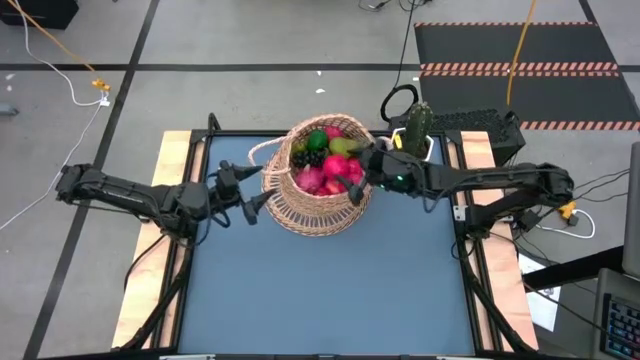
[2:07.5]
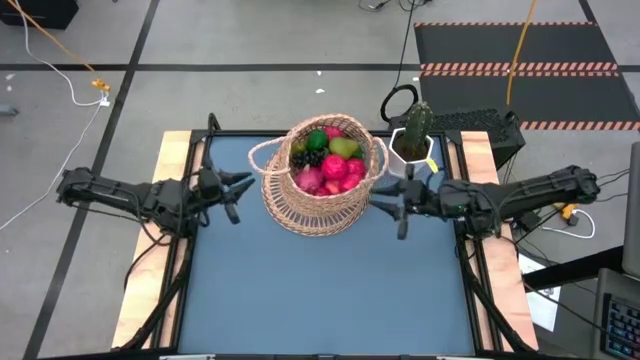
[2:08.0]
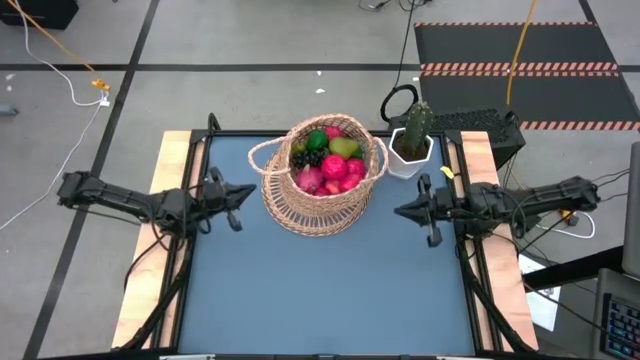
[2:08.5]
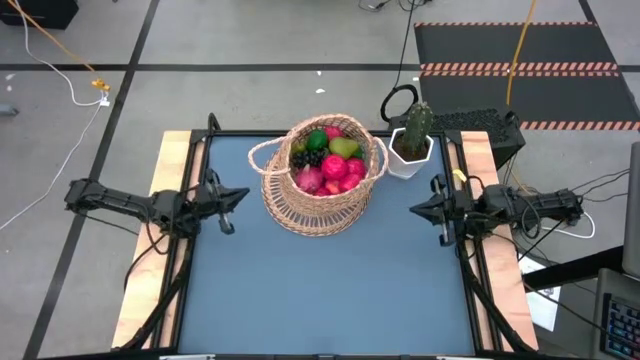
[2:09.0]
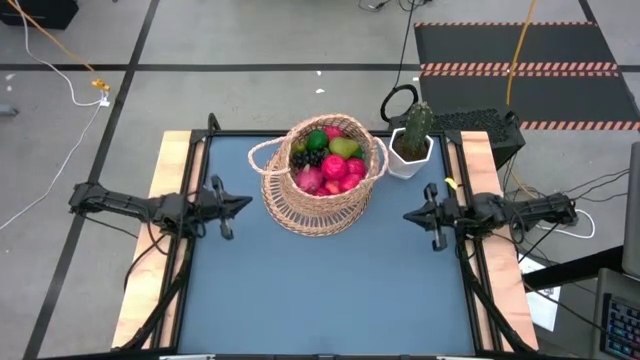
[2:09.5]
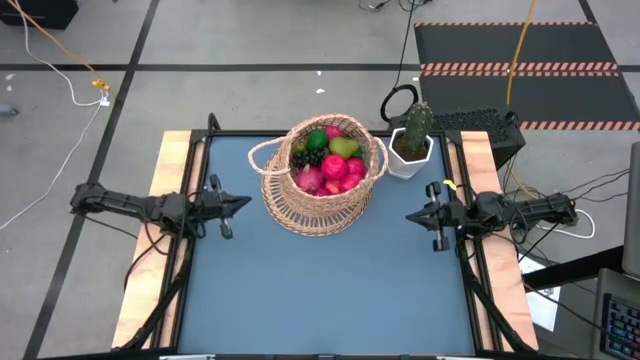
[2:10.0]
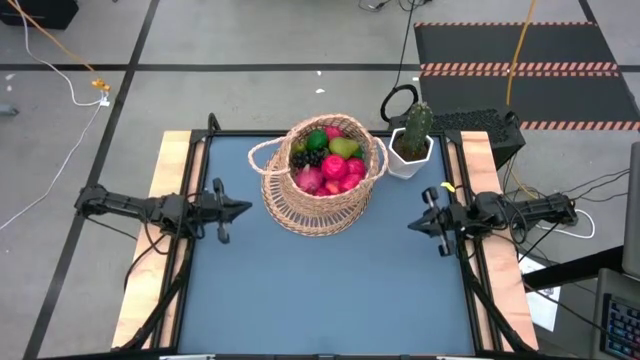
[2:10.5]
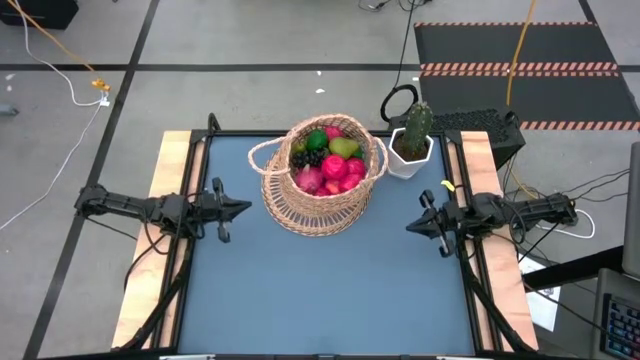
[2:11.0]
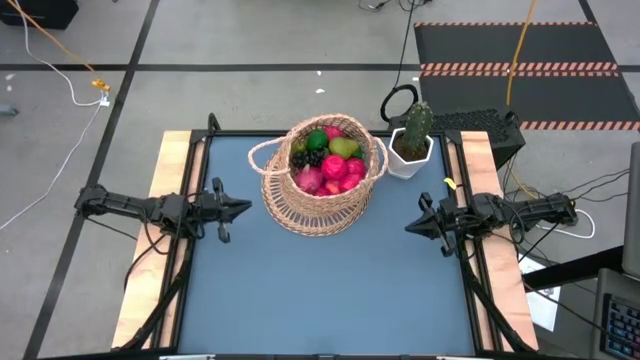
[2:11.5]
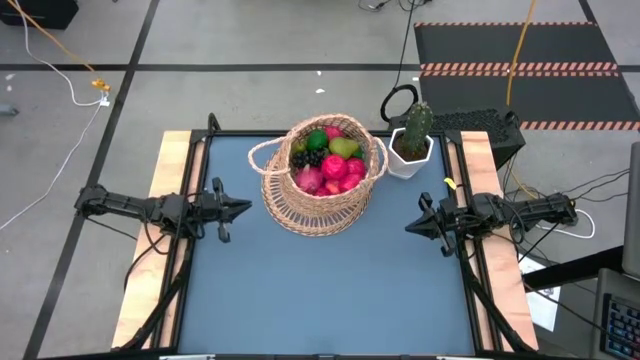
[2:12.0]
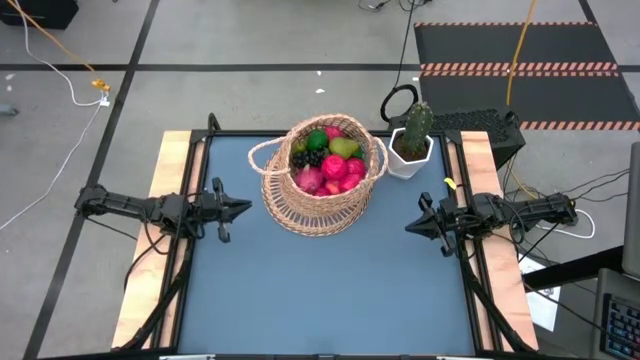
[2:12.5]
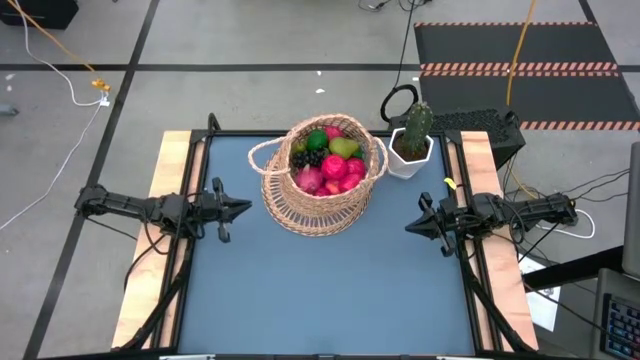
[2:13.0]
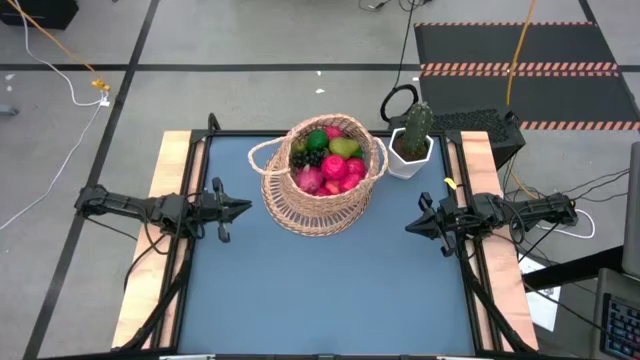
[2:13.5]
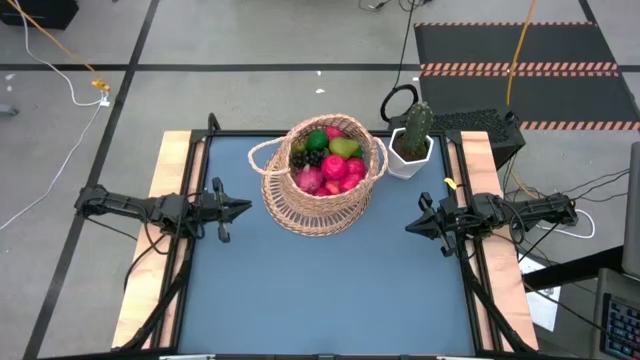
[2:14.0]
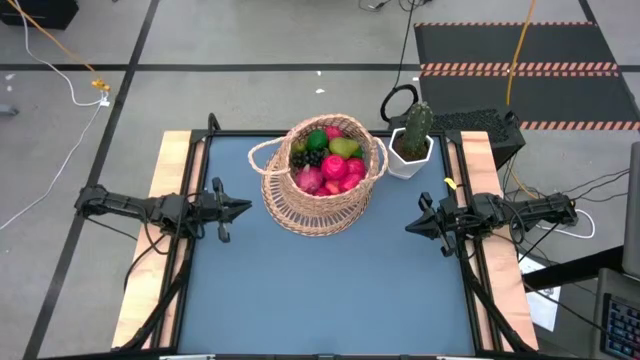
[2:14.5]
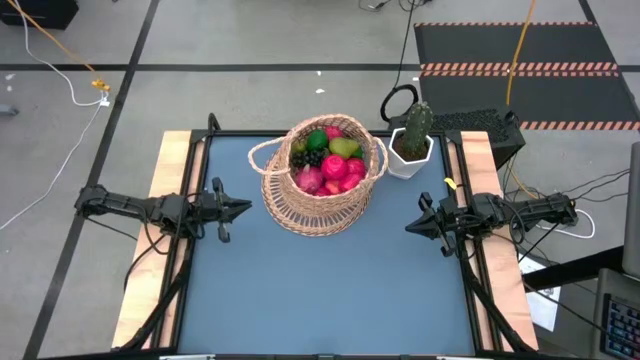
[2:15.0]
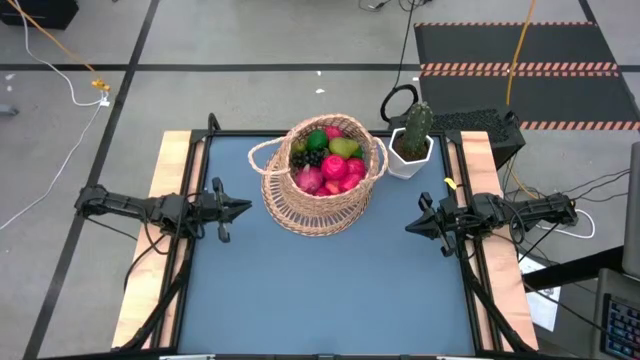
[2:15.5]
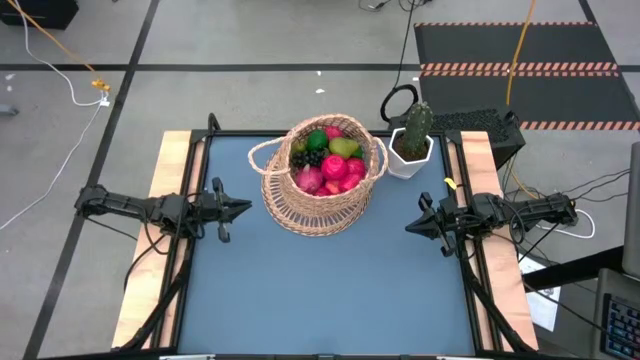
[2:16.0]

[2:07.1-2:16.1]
Task: Build produce basket
Return to Home Position

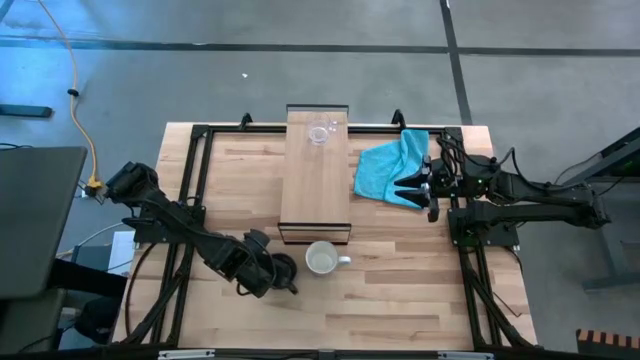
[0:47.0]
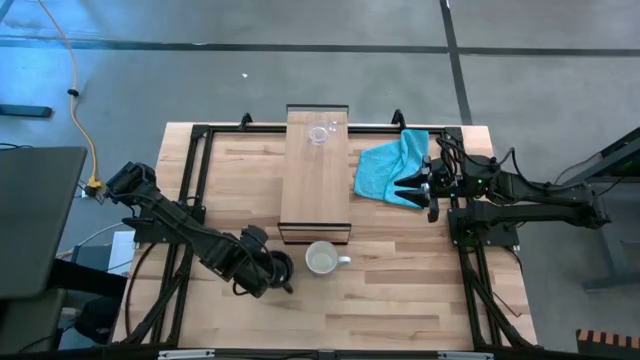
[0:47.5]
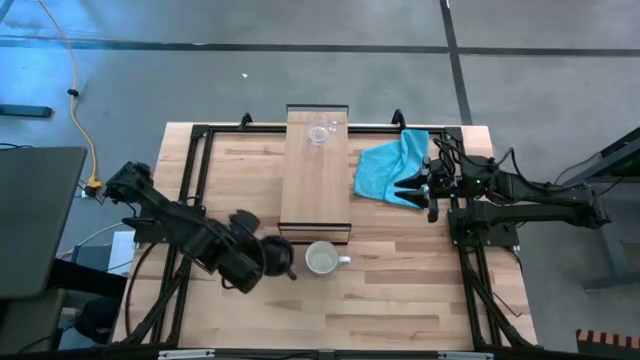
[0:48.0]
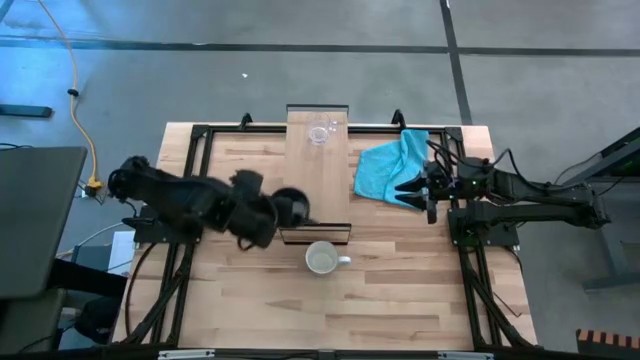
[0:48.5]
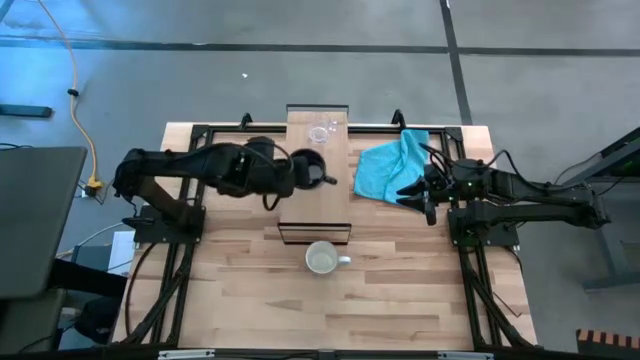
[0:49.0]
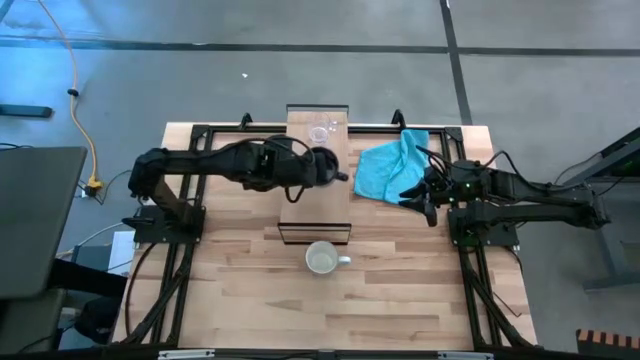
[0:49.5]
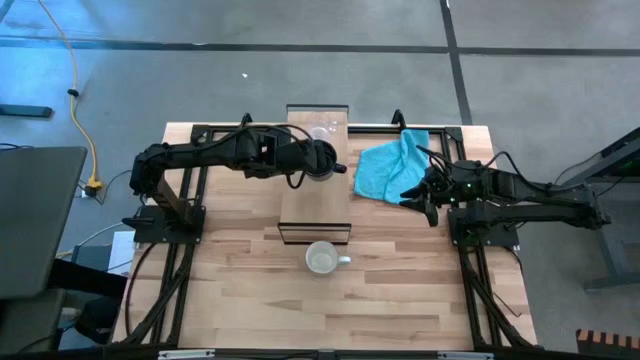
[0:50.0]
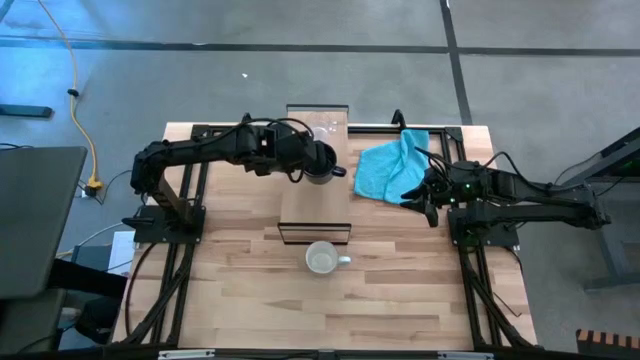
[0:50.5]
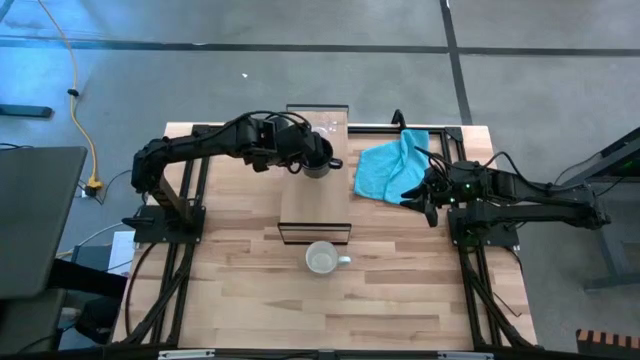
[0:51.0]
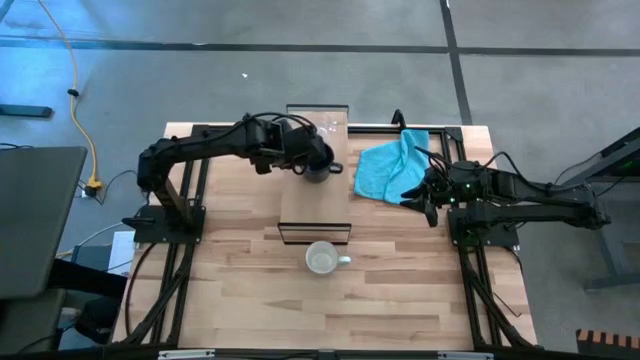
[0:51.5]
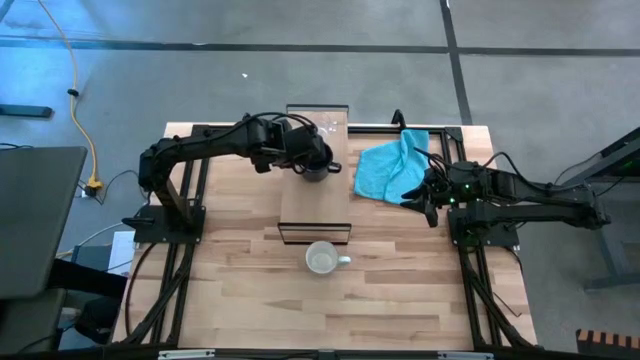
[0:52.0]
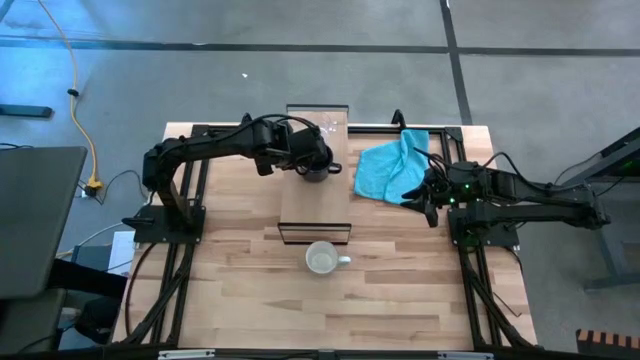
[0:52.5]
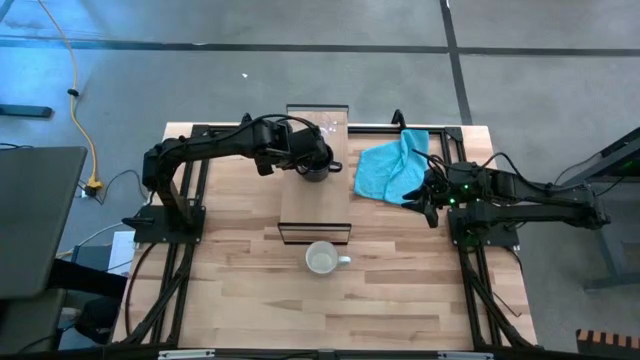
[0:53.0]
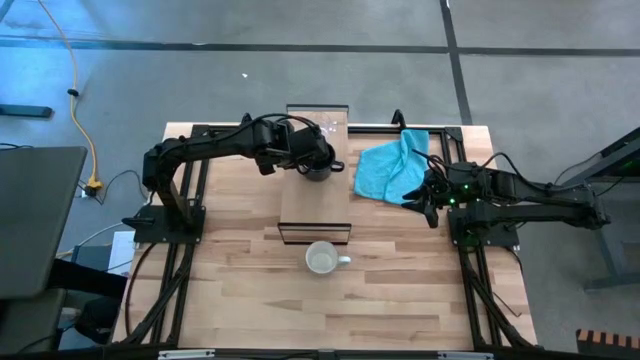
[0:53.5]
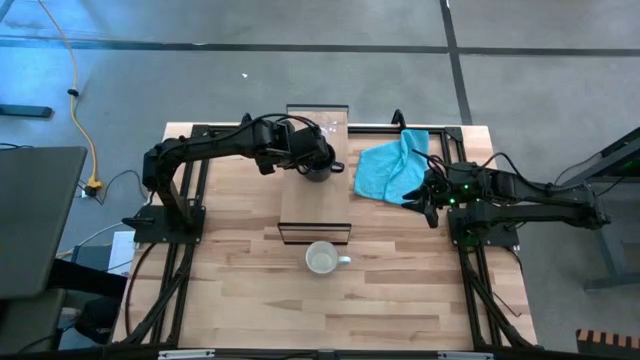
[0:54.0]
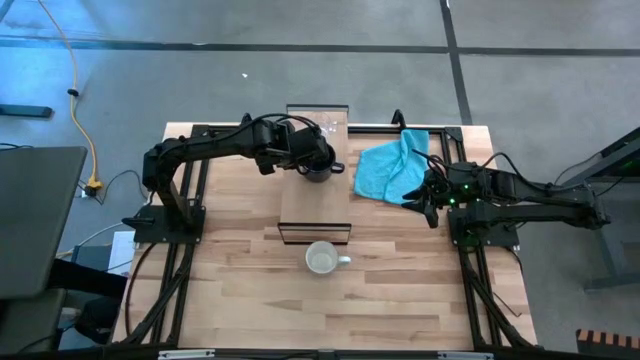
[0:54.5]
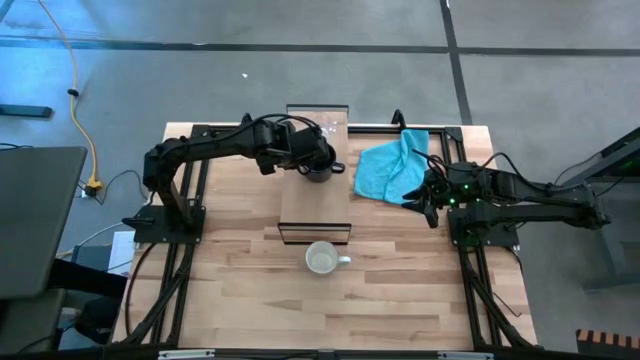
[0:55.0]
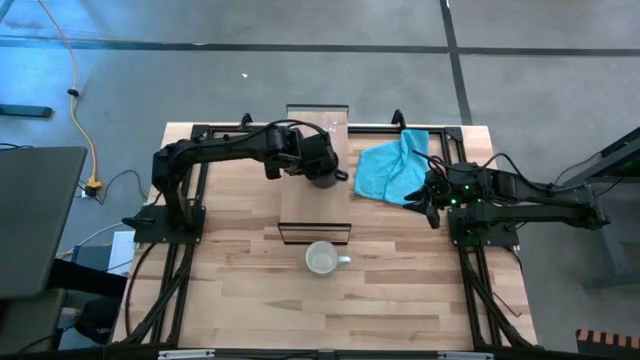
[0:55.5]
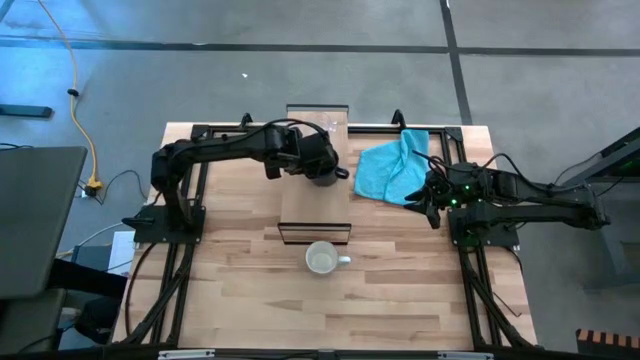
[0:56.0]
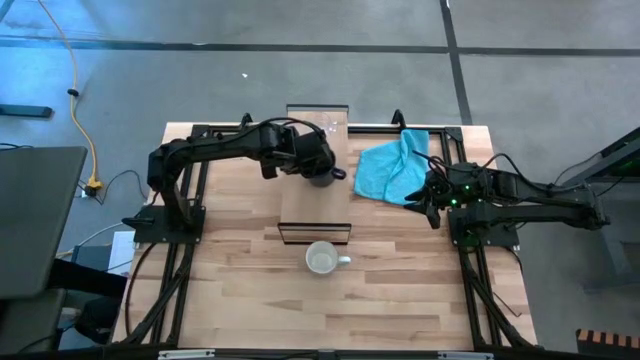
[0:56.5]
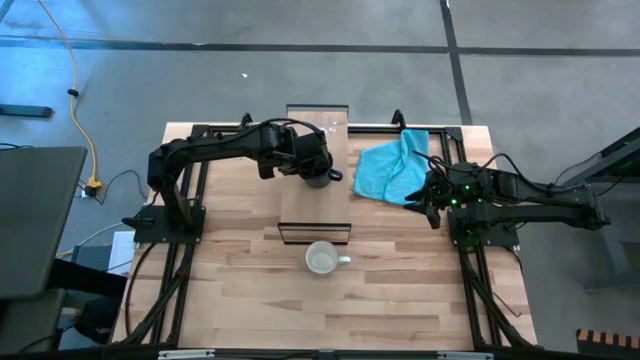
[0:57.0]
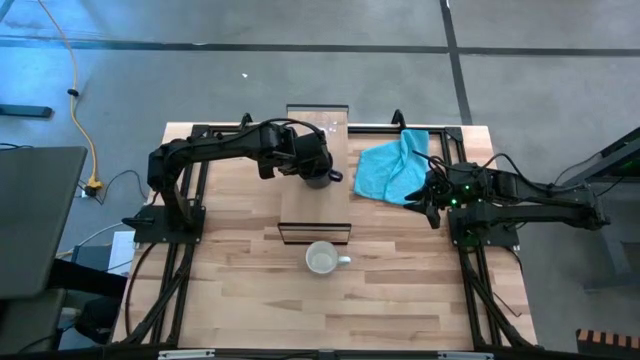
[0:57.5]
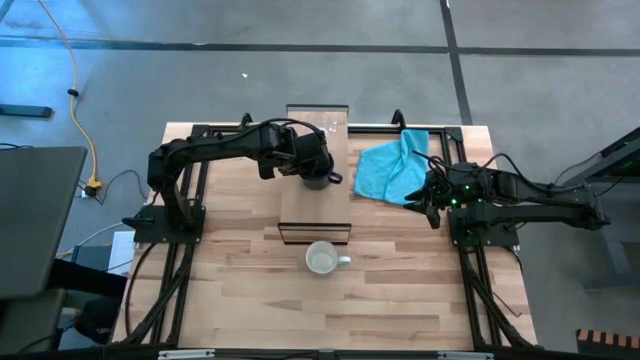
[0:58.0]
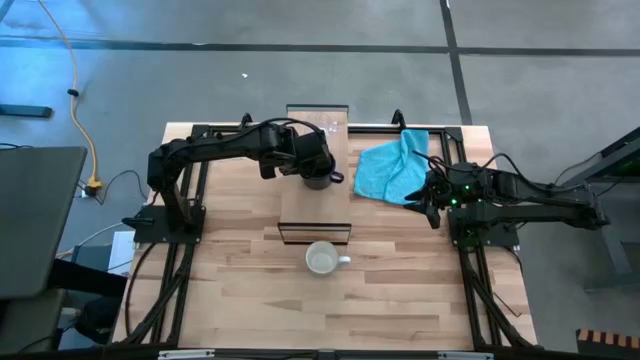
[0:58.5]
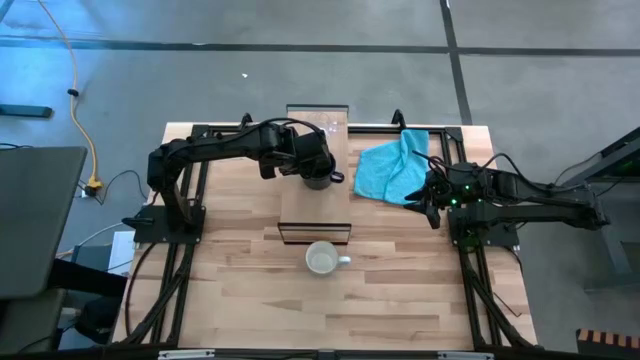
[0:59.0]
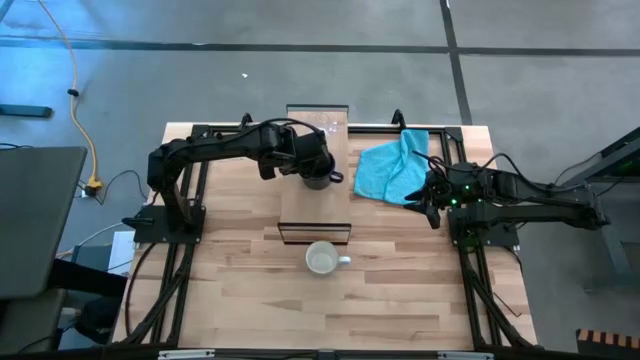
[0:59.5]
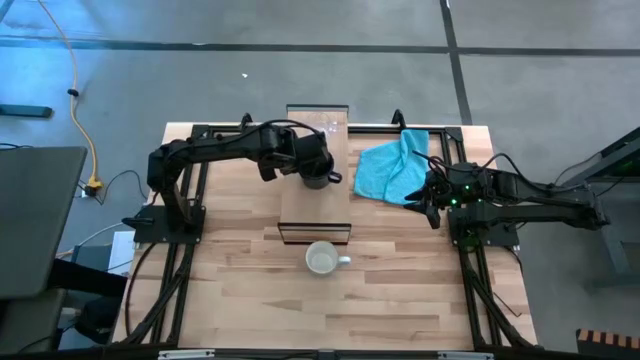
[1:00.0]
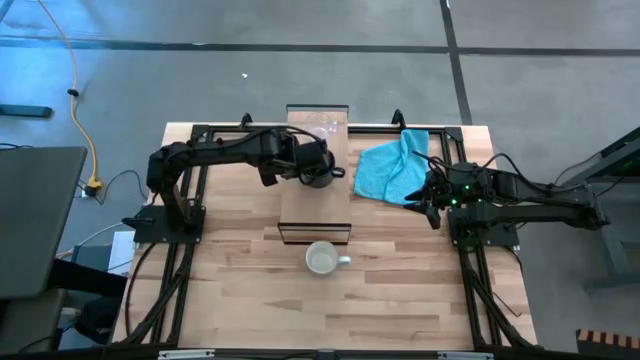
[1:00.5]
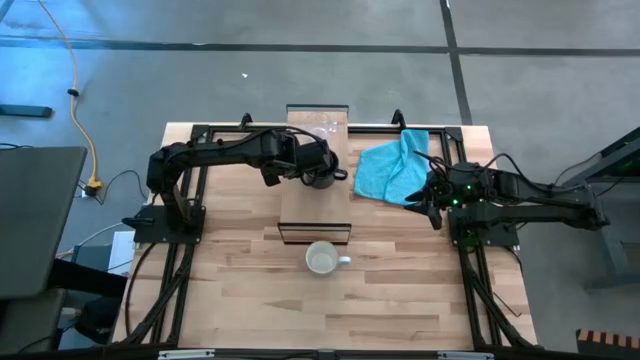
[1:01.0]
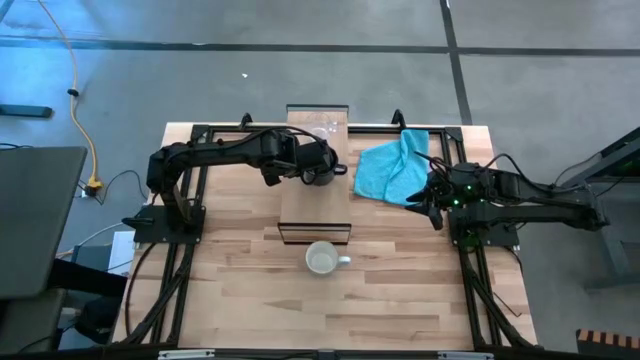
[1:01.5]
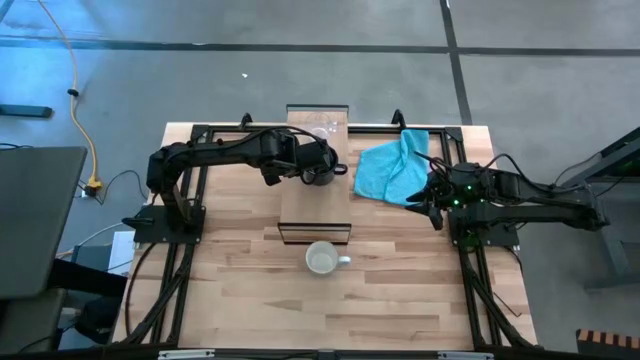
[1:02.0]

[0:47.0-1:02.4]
Task: Stack small to large cups/mugs on shelf
Put the dark blue mug on the shelf
